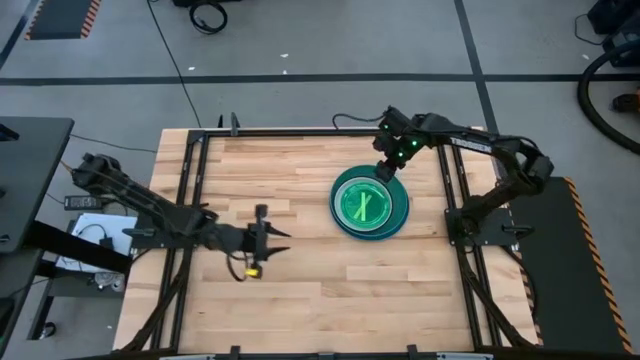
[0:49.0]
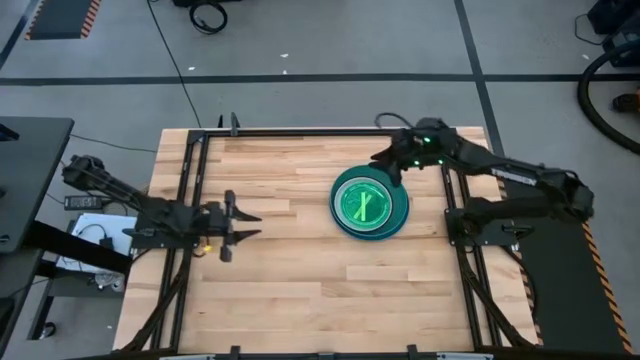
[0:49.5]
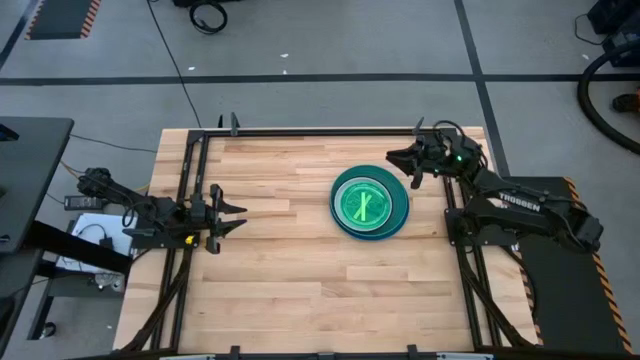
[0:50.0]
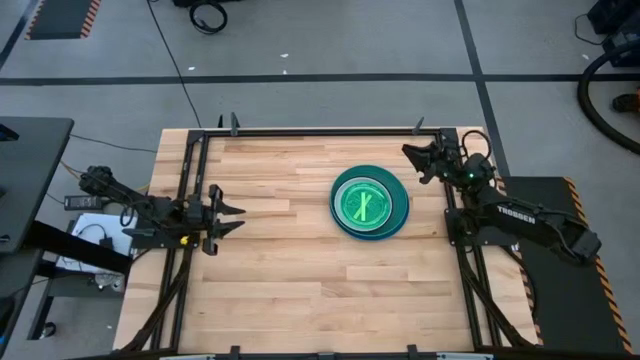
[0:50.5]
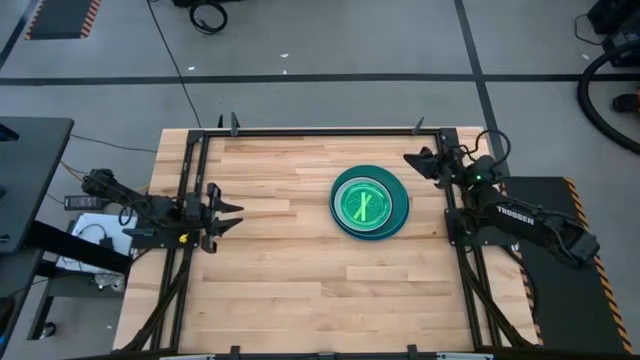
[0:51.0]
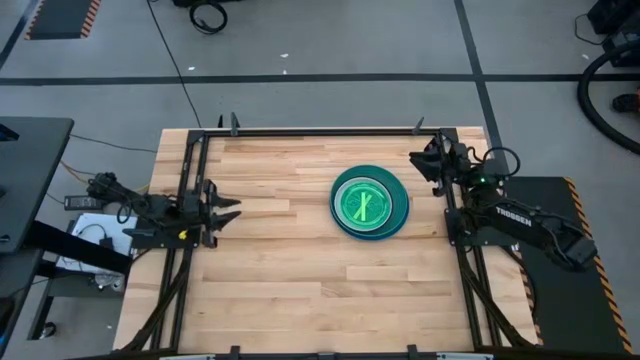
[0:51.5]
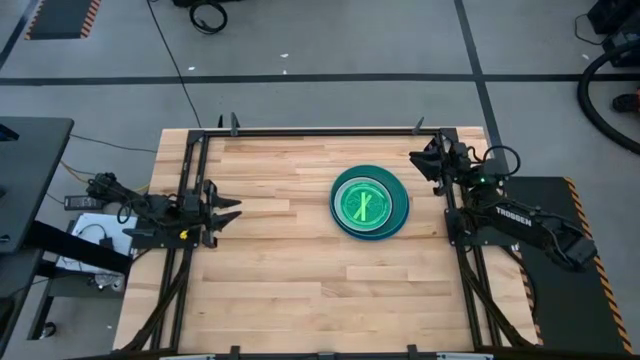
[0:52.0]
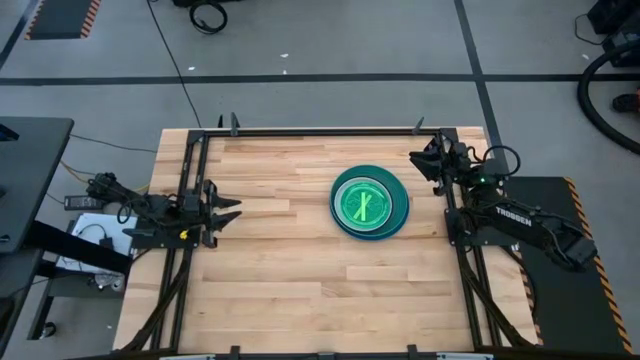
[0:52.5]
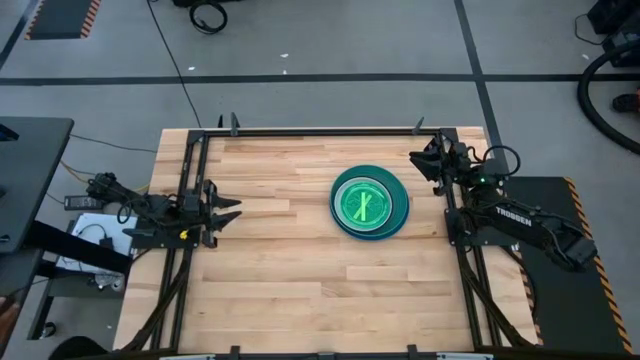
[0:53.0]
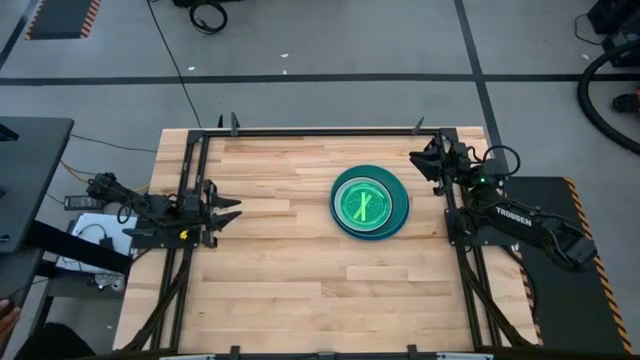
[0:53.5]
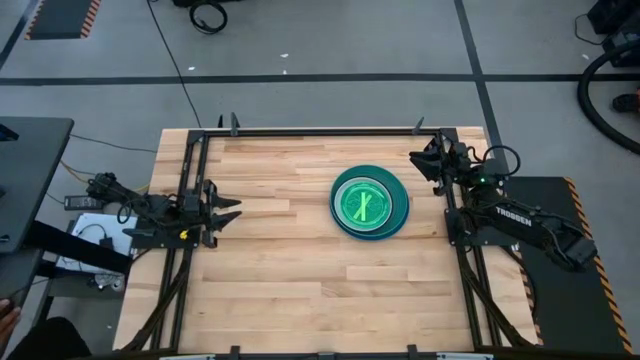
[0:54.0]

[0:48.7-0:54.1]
Task: Stack plastic plates
Return to Home Position

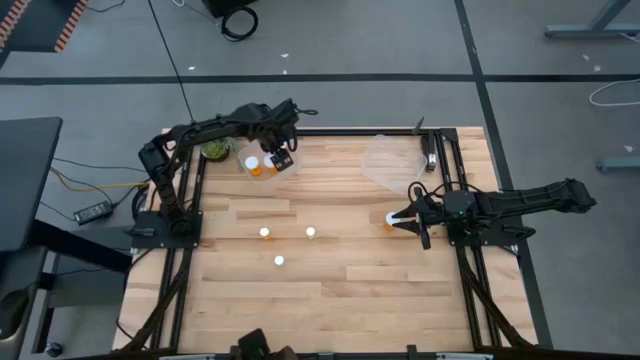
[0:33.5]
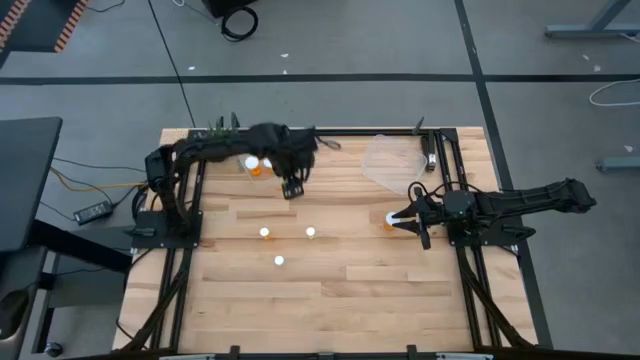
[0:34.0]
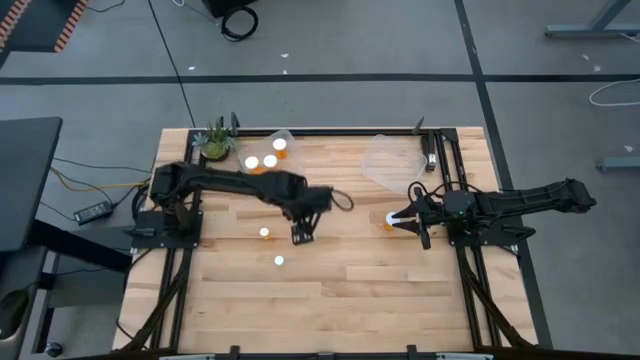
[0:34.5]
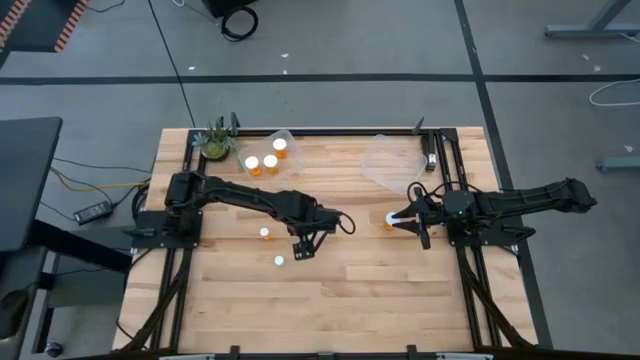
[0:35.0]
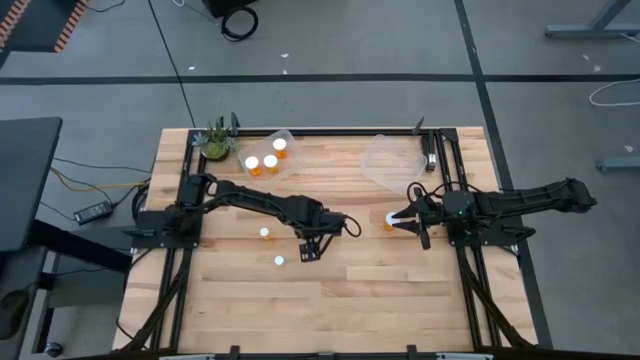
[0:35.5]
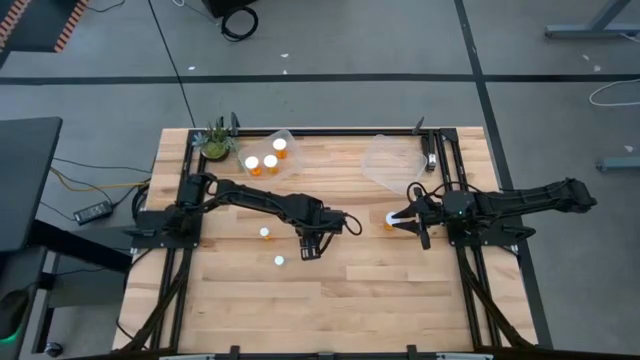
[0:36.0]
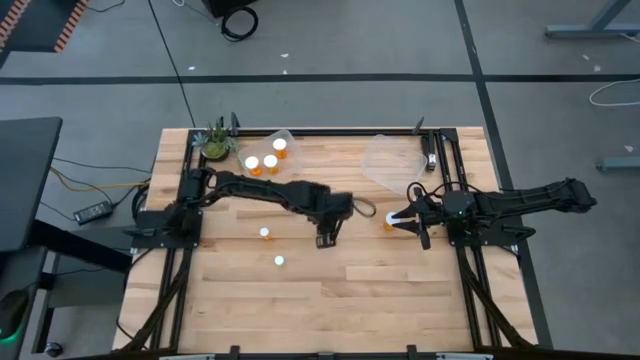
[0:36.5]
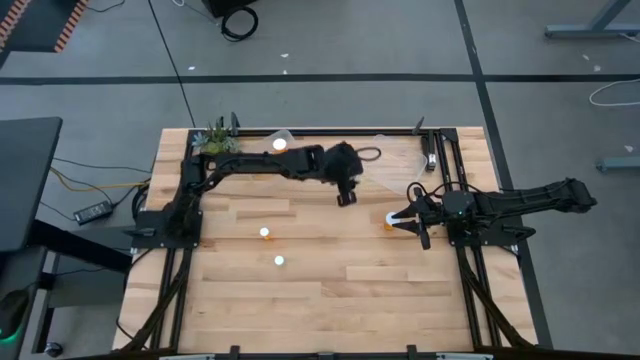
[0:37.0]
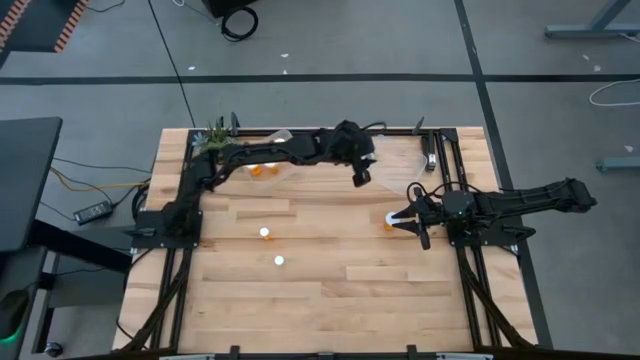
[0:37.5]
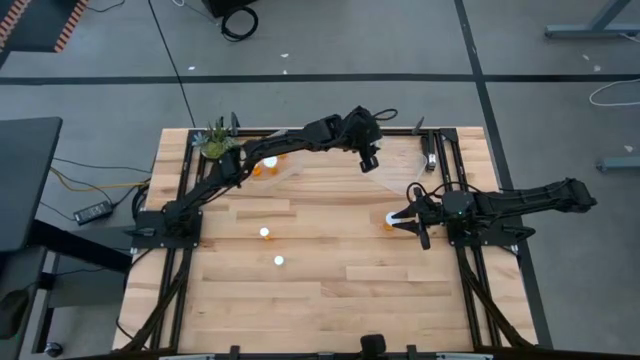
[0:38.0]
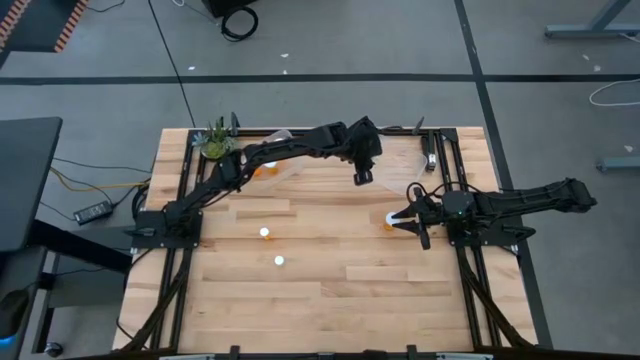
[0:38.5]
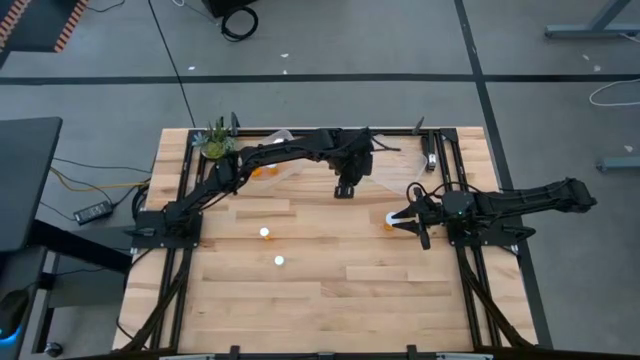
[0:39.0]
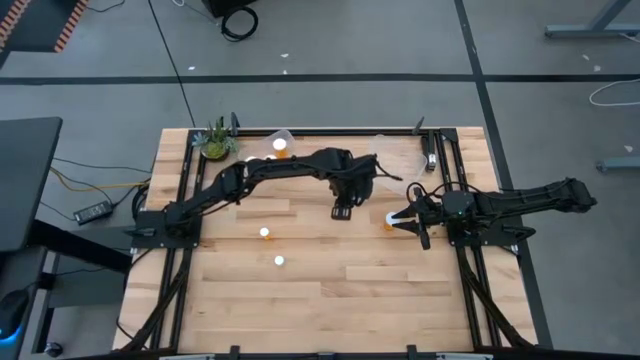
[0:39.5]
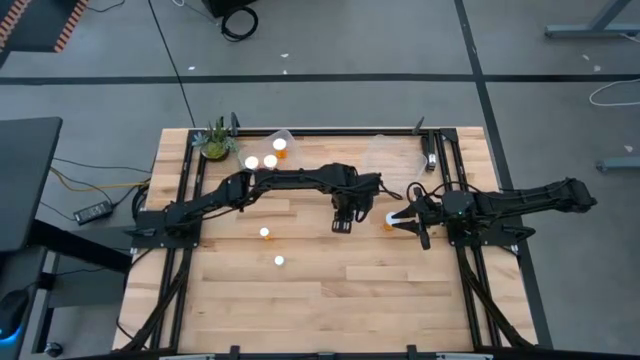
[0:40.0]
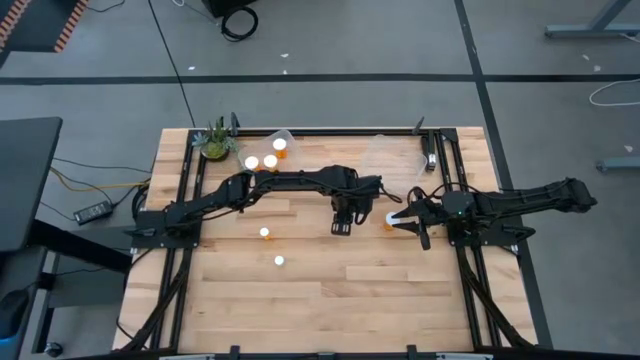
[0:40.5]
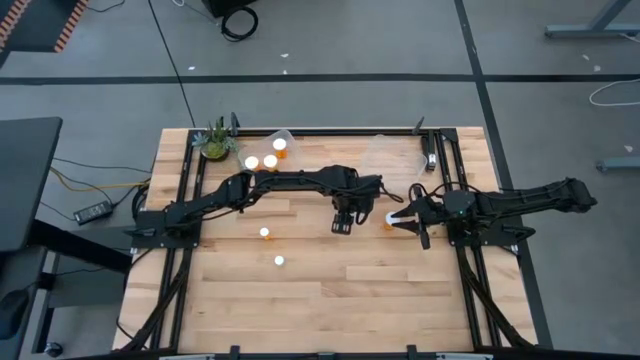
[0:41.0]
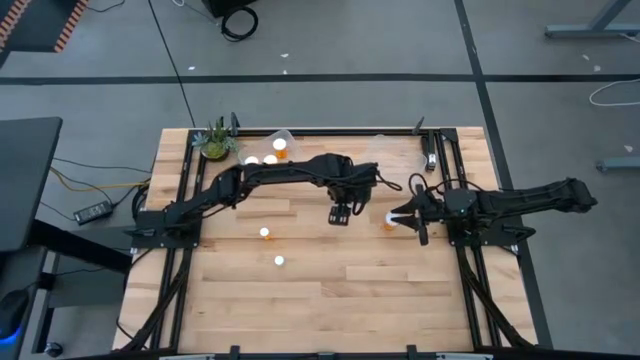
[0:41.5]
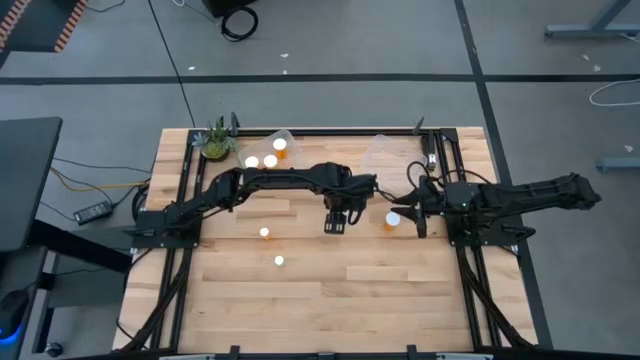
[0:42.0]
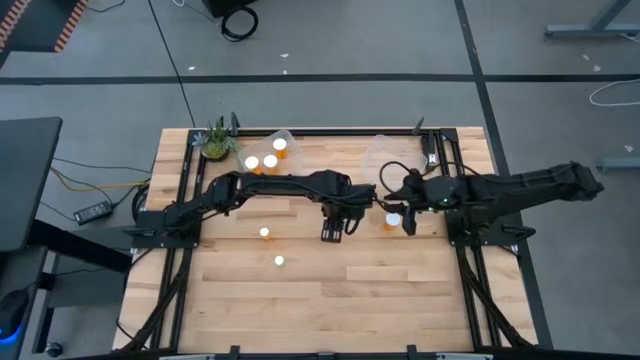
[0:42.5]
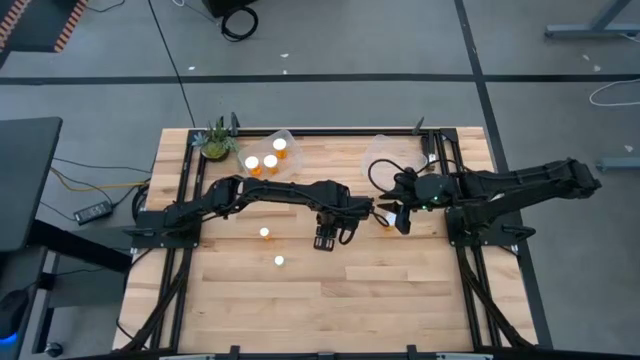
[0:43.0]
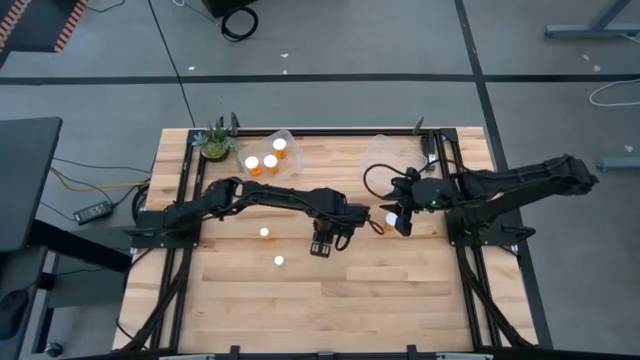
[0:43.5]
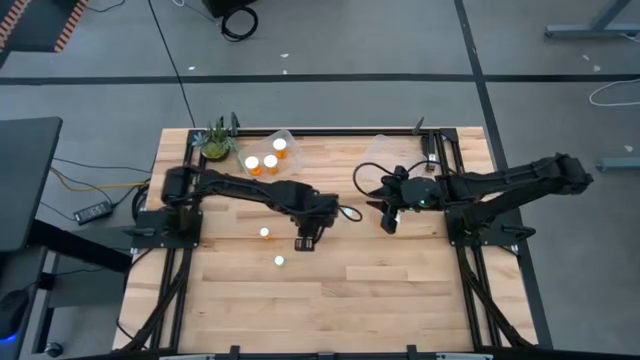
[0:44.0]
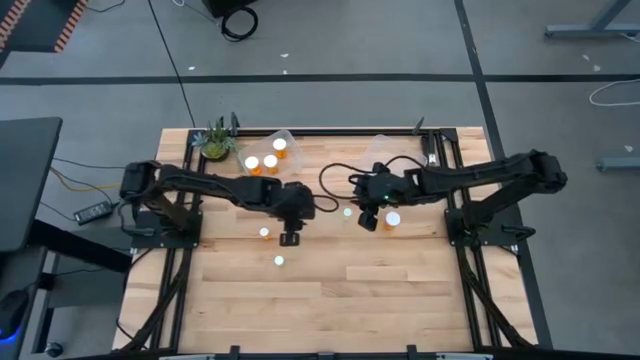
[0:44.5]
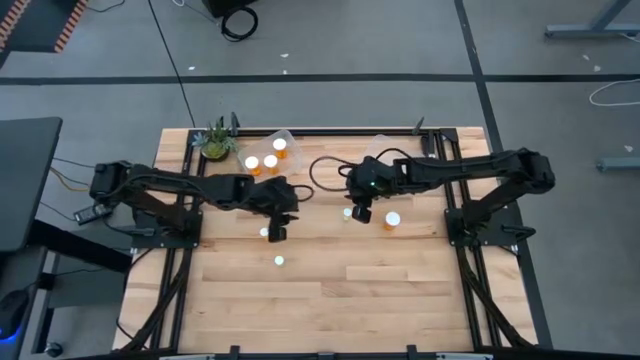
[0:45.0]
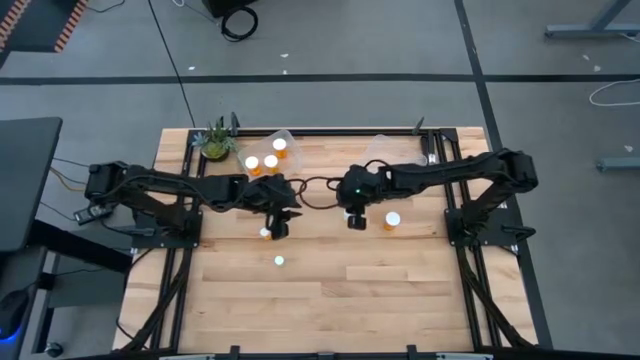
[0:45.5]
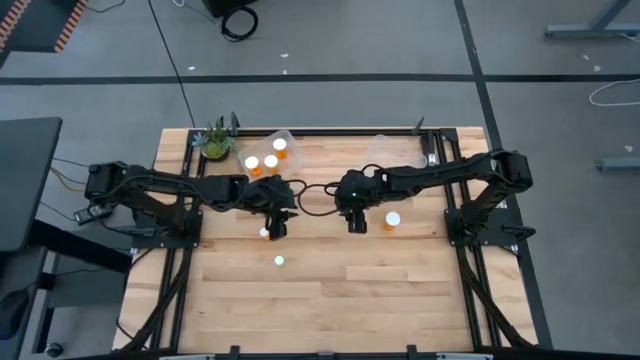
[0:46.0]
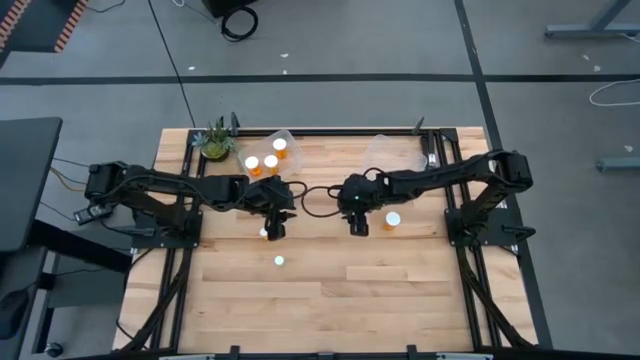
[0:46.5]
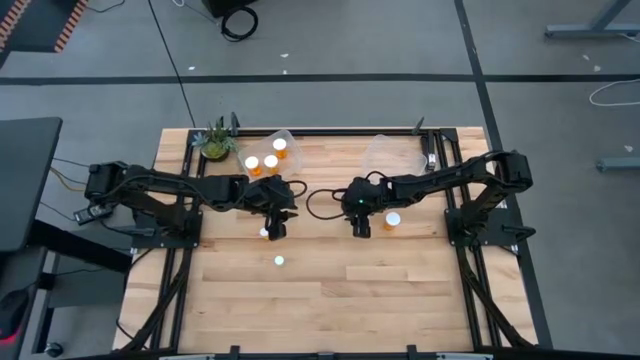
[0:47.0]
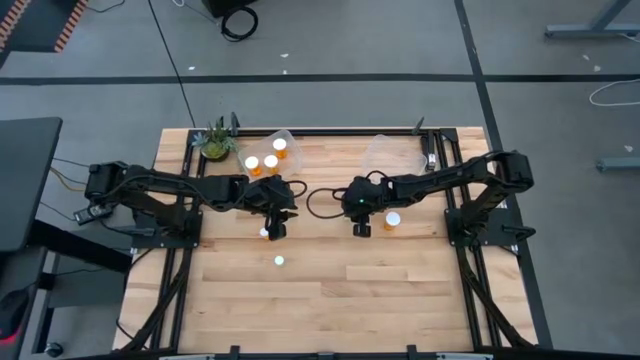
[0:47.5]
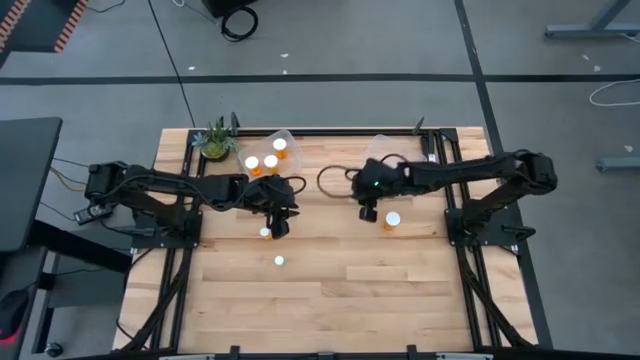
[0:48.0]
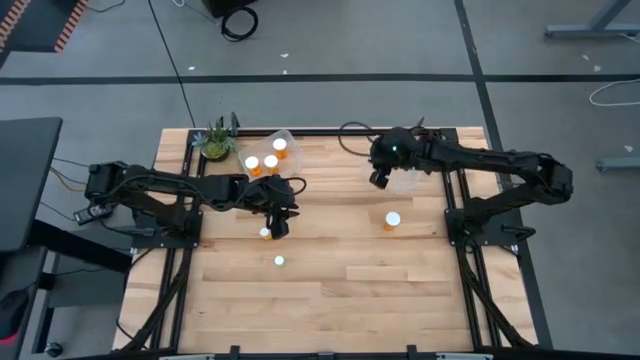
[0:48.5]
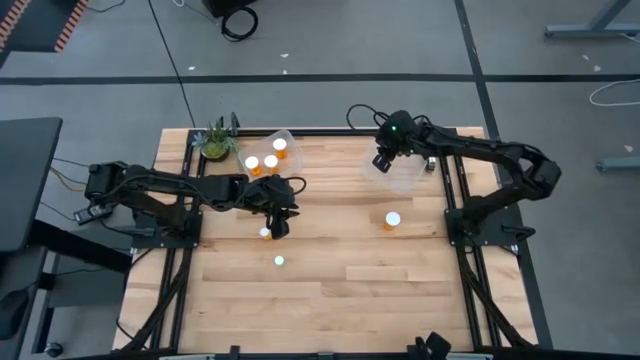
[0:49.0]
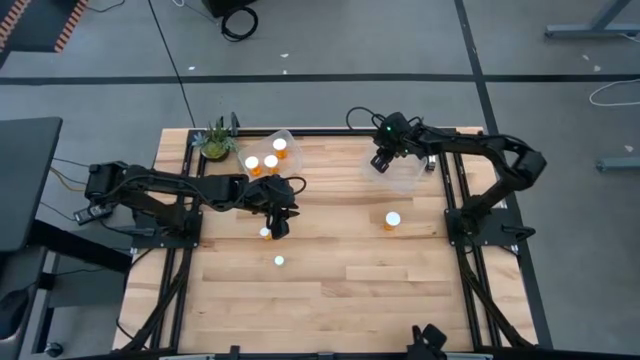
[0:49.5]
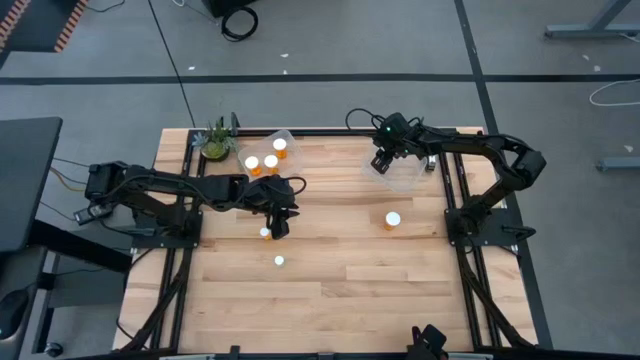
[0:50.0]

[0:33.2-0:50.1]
Task: Pick and place medicine bottles into bin by pill shape (circle, oval)
Put the yellow tablet bottle into the right transparent bin
